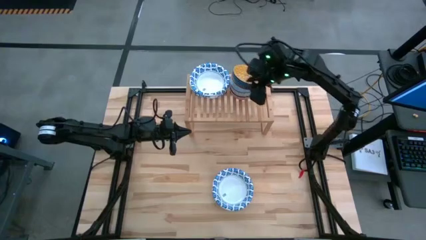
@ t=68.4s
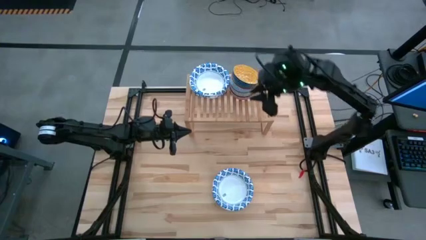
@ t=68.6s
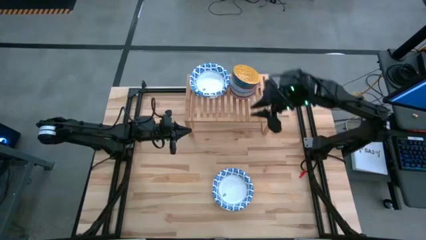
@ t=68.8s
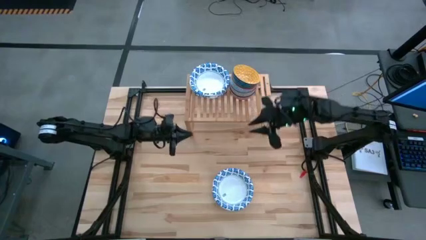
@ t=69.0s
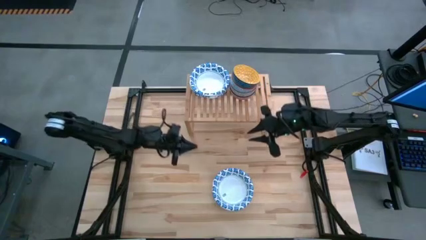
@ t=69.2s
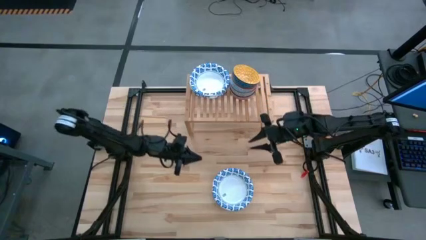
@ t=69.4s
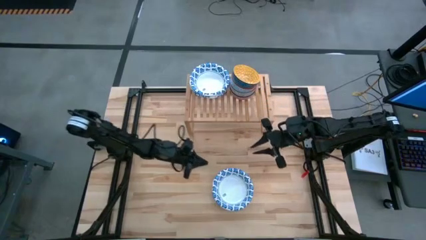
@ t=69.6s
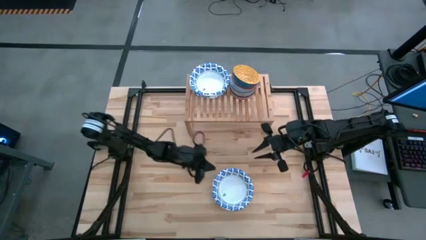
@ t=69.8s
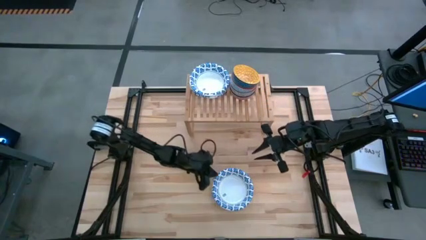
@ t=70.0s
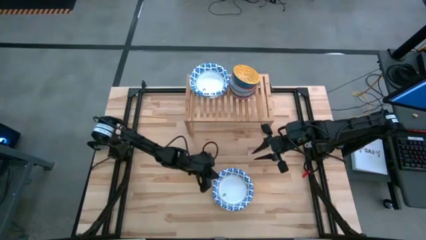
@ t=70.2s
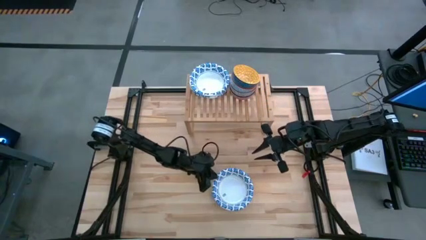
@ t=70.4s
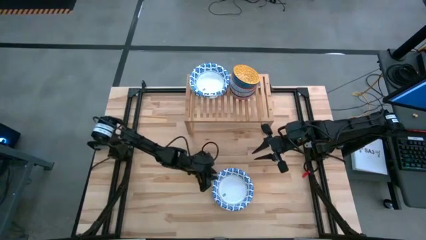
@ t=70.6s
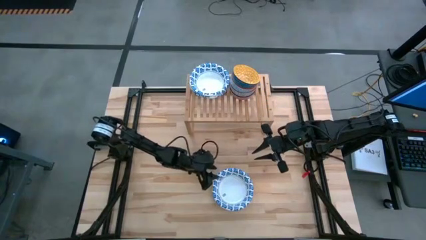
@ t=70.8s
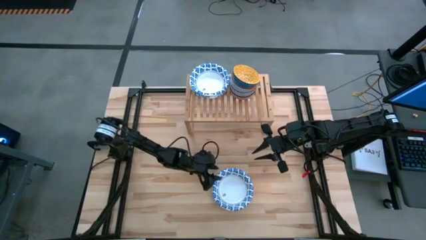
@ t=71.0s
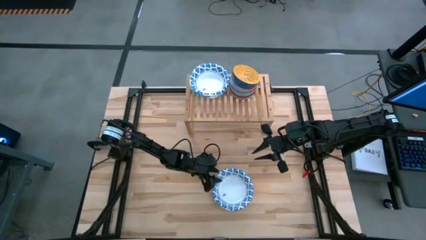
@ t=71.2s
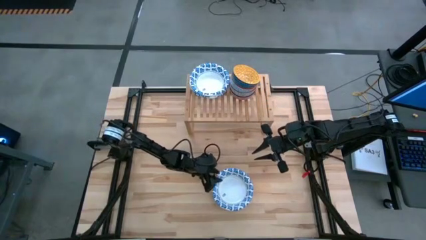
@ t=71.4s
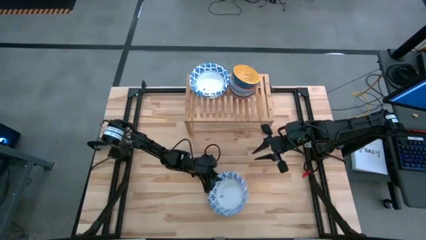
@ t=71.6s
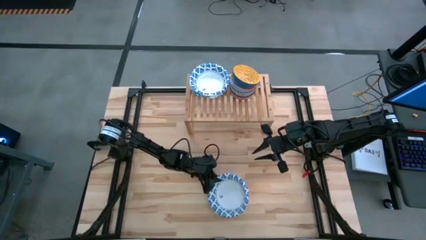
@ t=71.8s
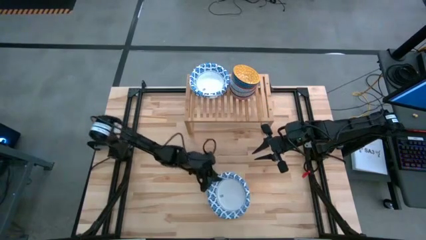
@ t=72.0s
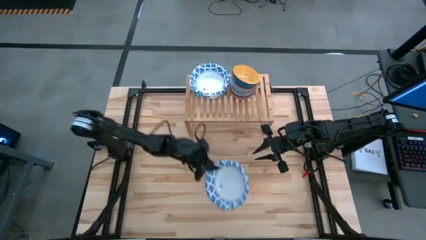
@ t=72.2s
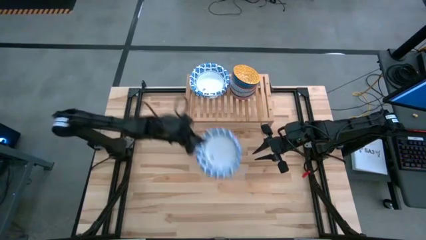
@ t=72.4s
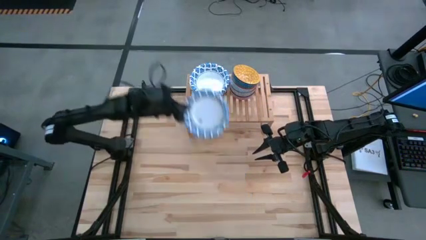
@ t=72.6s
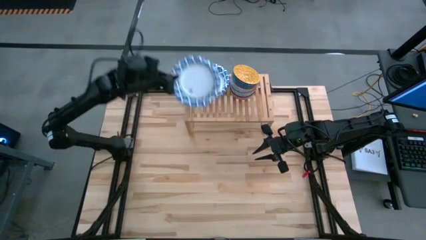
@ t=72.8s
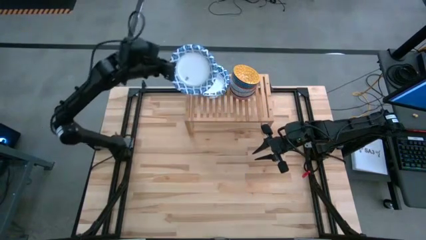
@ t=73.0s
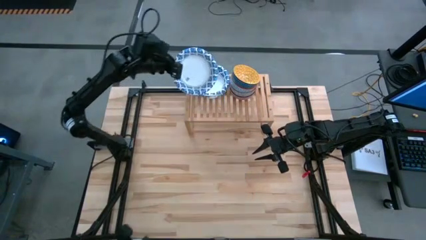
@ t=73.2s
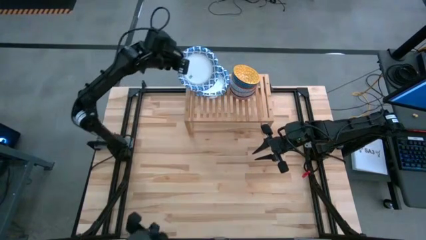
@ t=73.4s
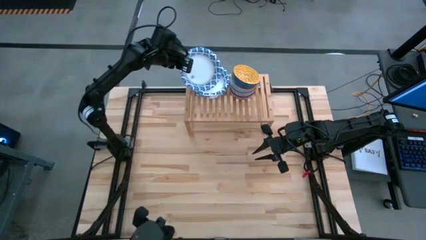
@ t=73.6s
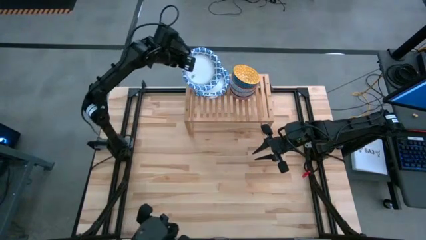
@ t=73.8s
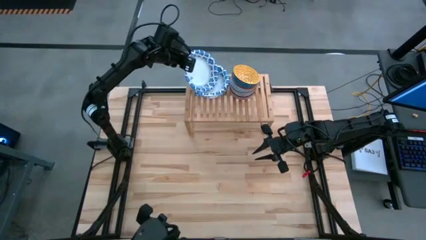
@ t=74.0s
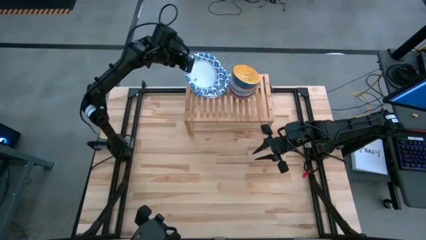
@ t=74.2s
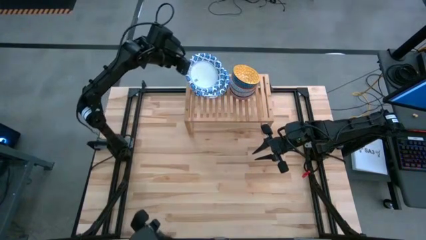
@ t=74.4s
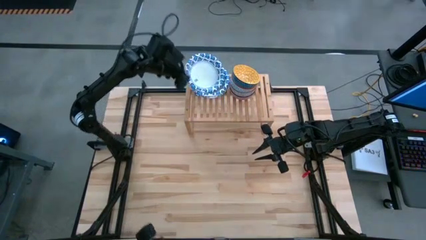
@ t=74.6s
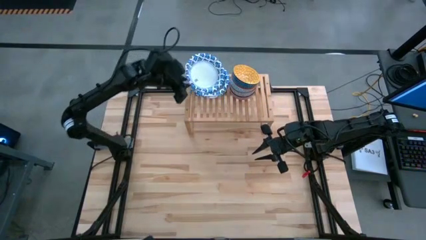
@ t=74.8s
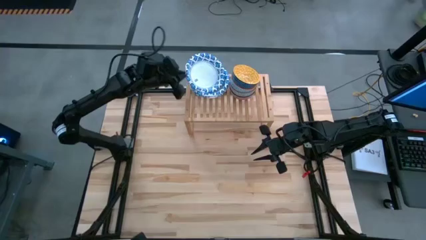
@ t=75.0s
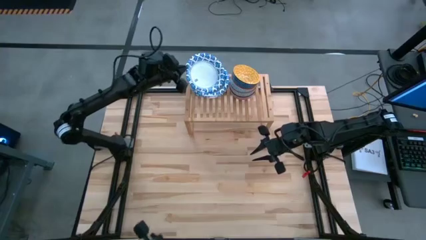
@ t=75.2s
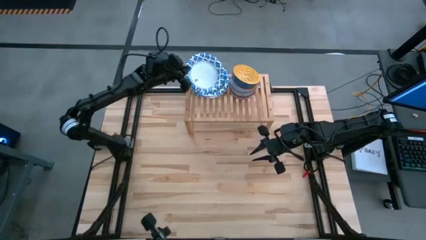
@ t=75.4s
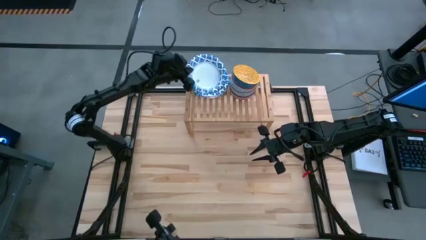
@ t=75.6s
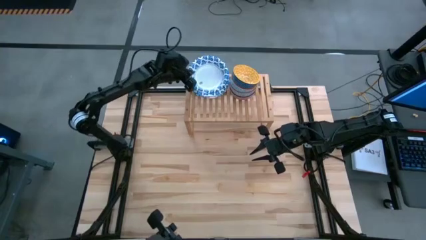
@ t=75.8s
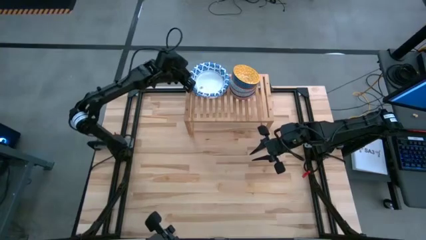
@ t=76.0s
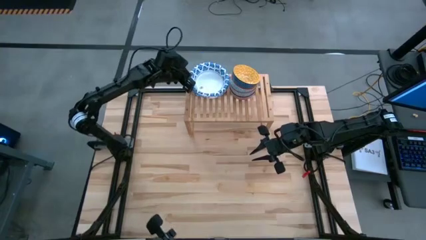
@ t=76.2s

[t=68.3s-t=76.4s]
Task: Place and stack bowls onto a shelf
Stack the white bowl on top of the white bowl on the shelf

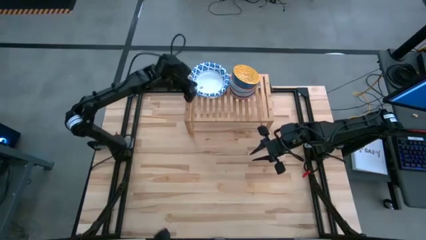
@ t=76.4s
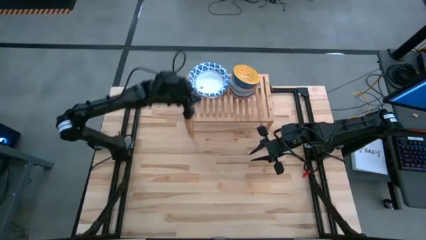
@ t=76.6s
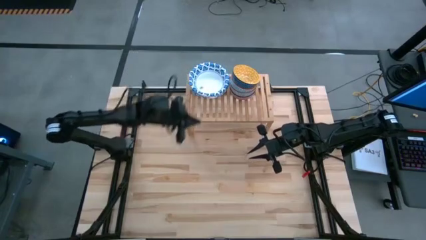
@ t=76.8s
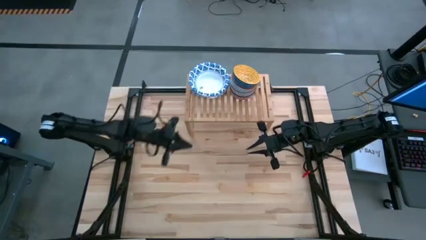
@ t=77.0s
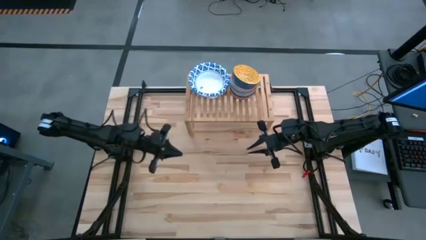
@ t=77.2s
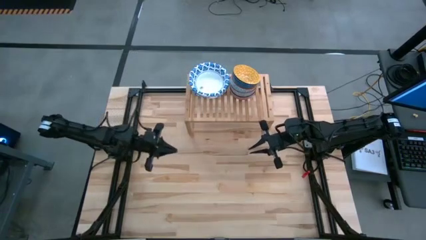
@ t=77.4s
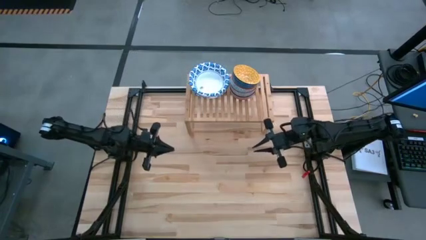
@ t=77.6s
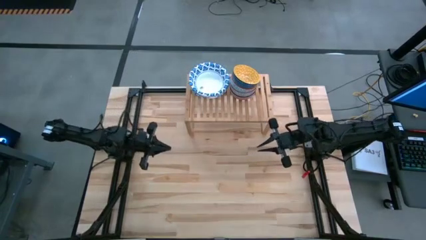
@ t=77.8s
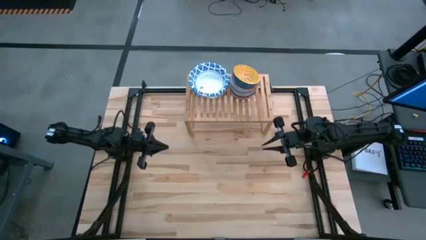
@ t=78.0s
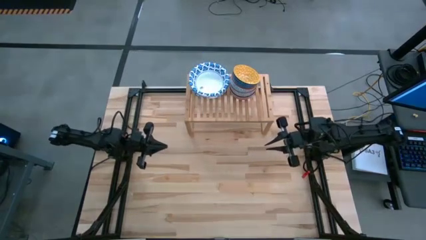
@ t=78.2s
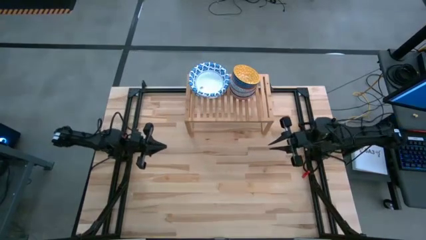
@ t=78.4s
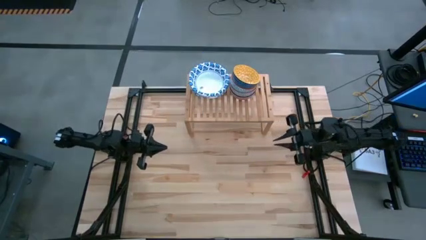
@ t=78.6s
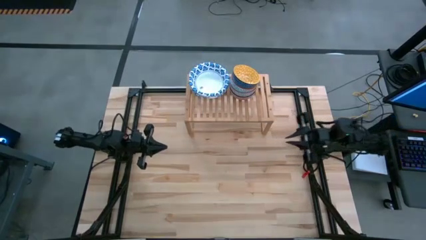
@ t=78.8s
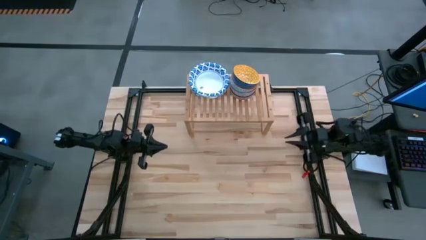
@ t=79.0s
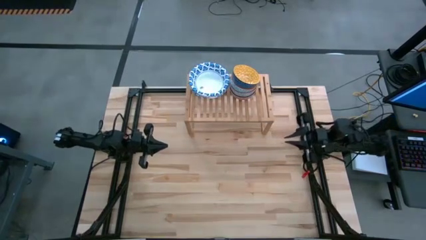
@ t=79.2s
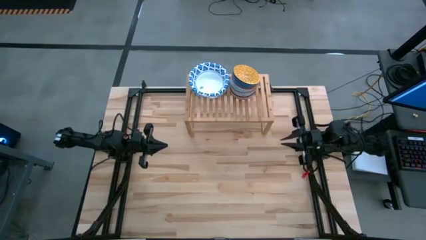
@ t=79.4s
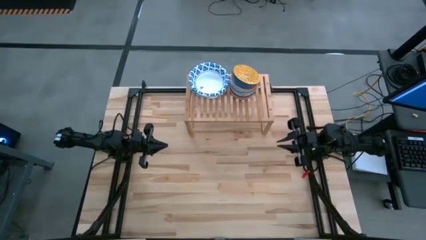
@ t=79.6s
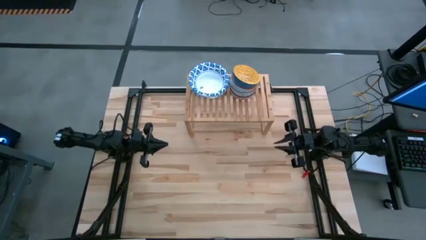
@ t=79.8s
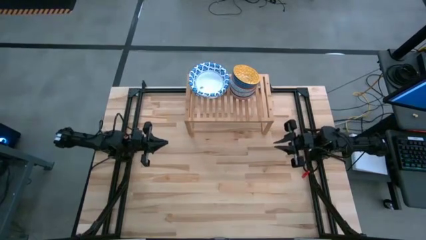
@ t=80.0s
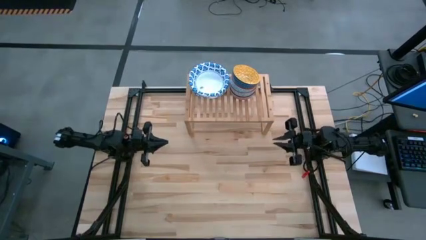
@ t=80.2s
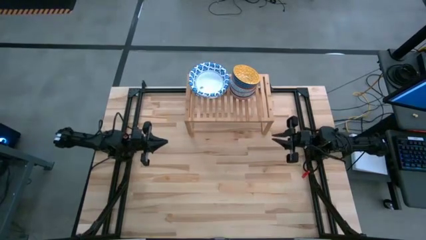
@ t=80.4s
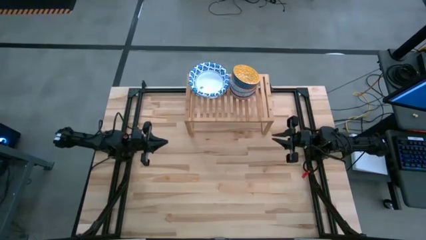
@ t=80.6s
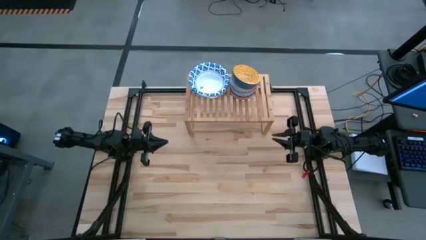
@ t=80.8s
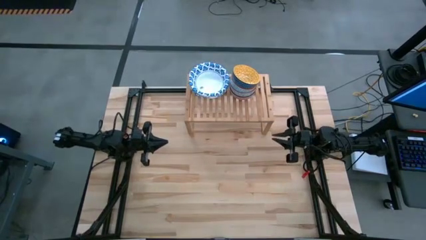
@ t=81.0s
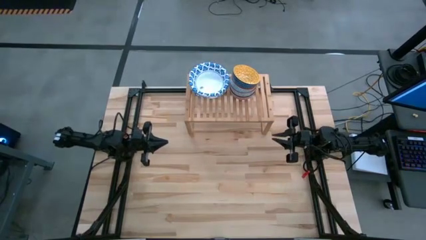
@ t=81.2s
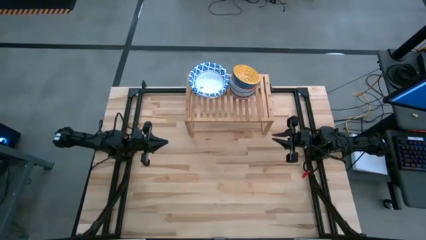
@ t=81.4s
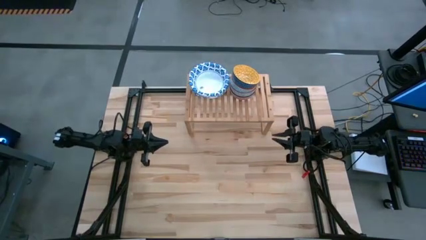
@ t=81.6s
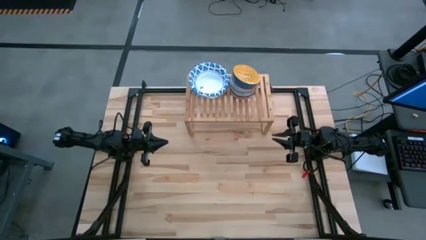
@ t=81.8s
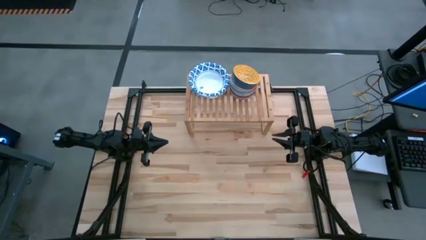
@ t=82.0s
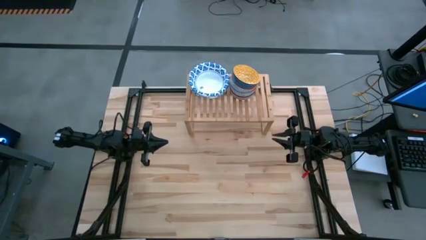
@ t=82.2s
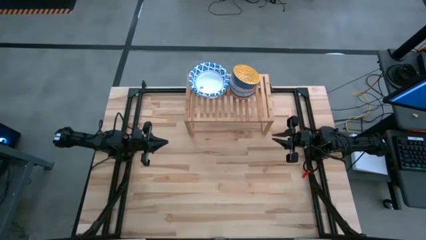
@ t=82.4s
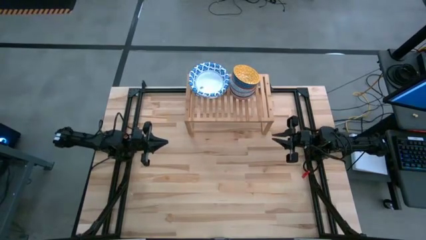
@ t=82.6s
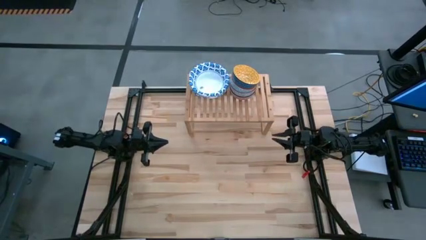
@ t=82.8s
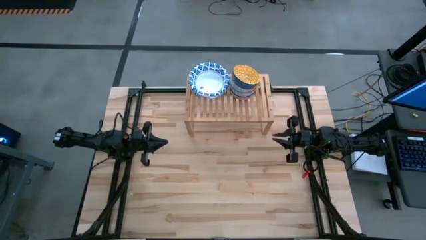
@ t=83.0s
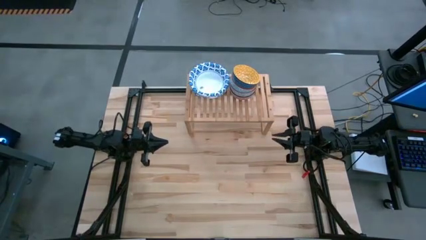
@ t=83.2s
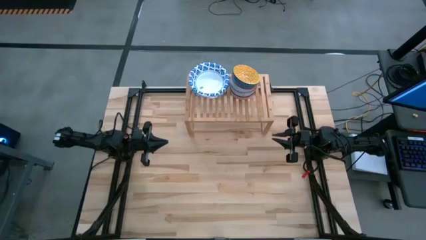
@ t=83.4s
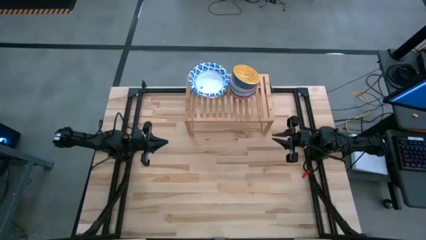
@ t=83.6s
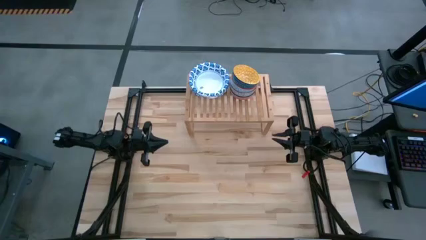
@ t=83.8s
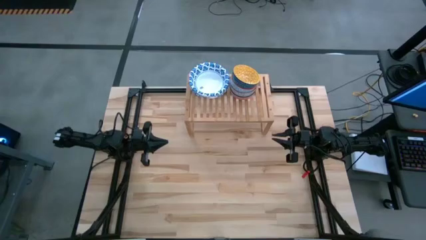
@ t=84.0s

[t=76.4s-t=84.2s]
Return to Home Position

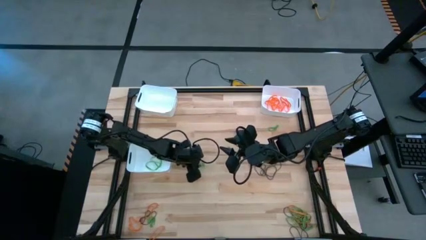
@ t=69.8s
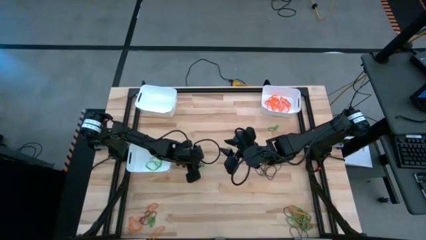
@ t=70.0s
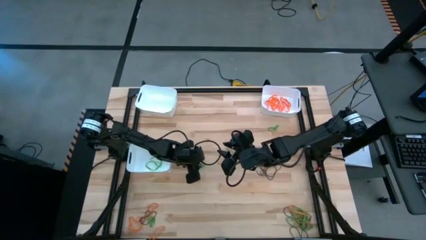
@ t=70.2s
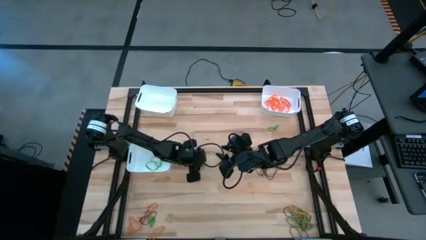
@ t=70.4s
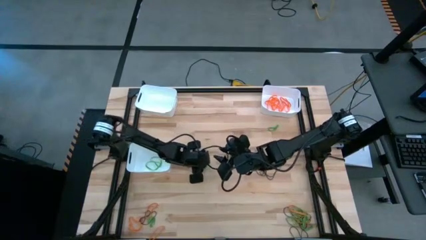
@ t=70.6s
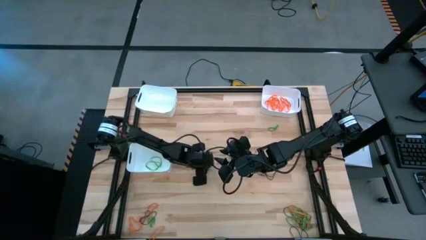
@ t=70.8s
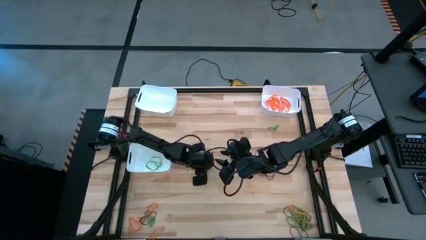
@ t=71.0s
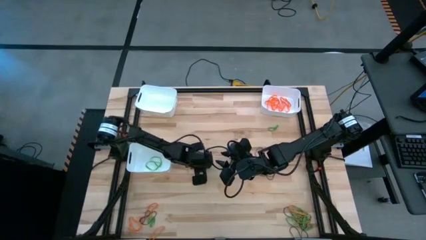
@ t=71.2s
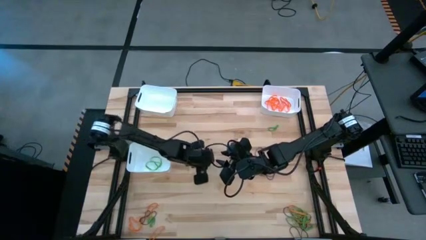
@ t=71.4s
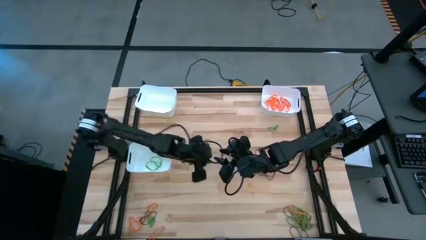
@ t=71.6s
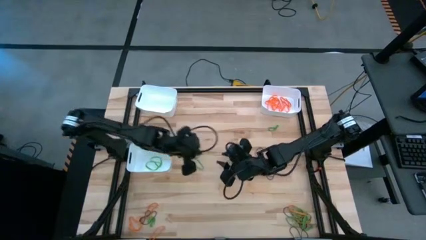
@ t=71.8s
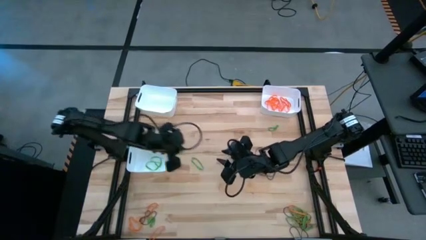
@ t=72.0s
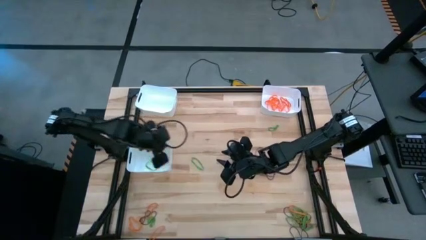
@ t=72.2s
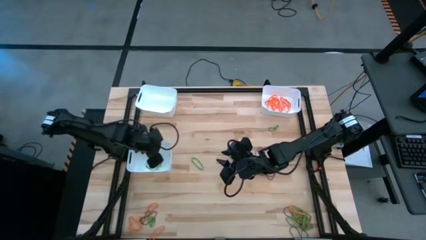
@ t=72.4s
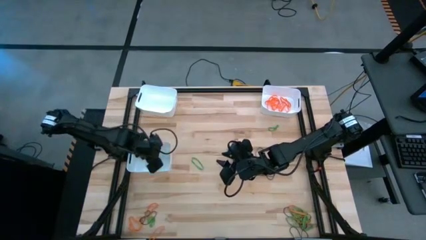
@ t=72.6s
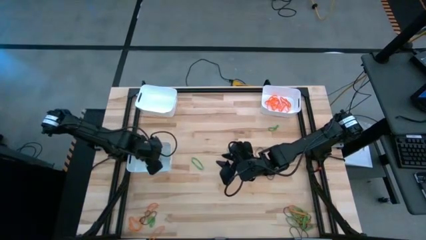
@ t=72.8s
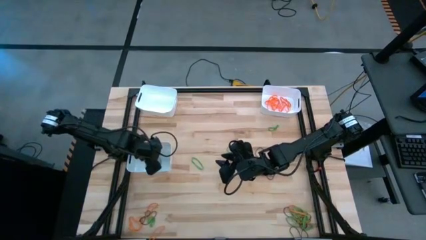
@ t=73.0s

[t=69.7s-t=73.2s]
Task: Sort rubber bands into baskets
Put the green rubber band into the bottom white bin
